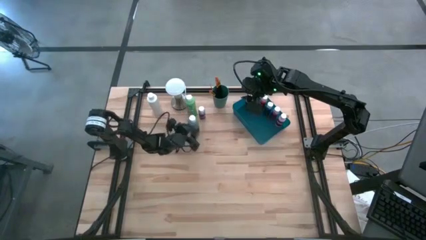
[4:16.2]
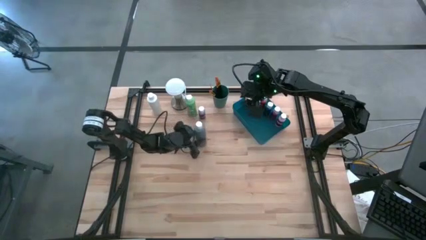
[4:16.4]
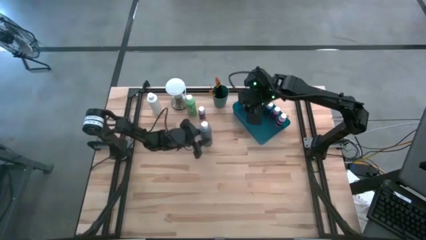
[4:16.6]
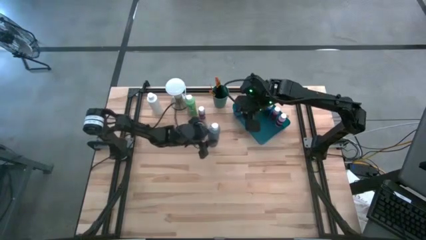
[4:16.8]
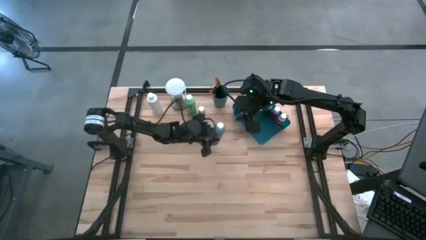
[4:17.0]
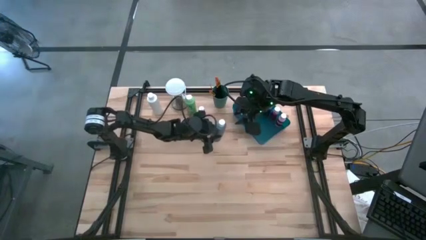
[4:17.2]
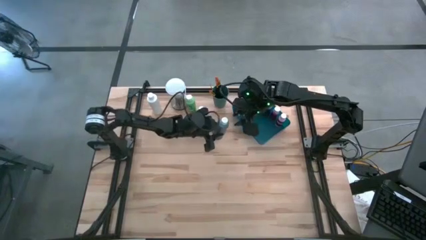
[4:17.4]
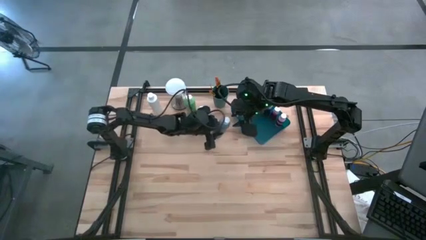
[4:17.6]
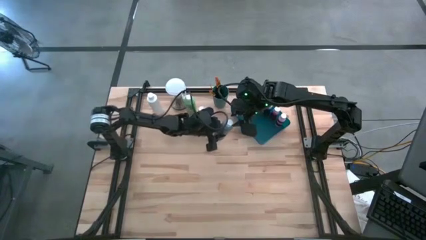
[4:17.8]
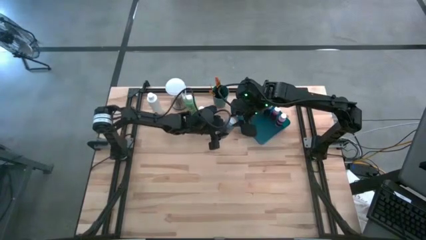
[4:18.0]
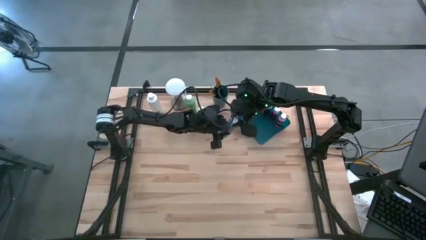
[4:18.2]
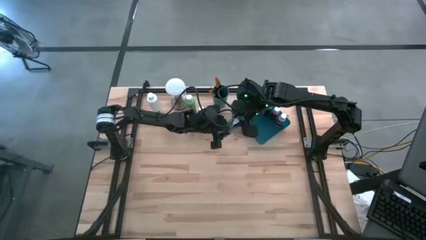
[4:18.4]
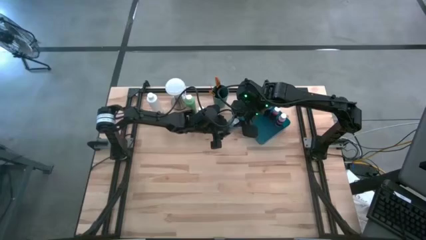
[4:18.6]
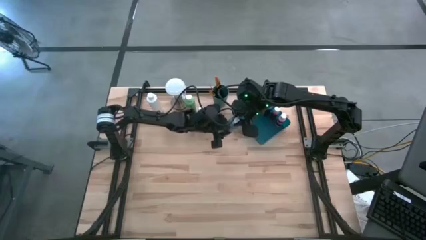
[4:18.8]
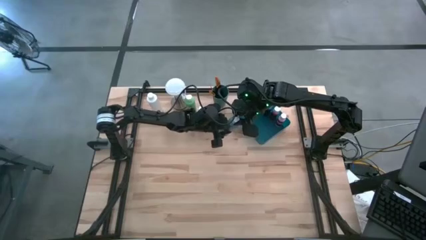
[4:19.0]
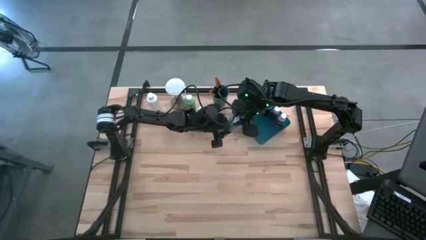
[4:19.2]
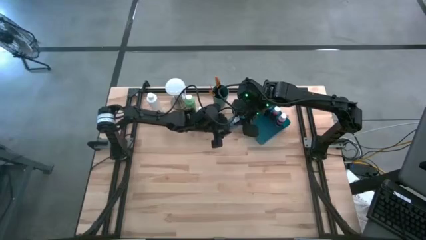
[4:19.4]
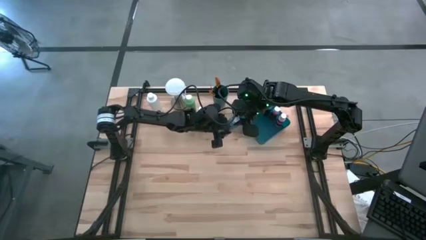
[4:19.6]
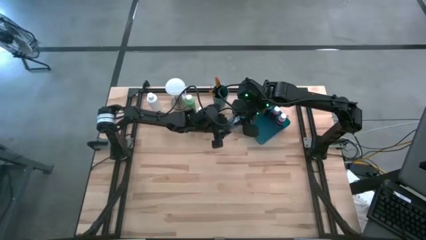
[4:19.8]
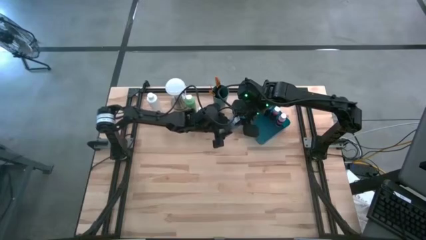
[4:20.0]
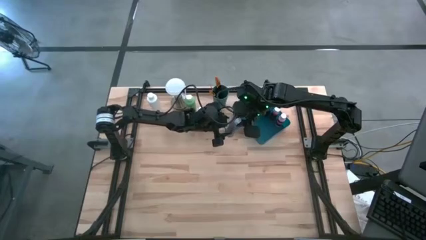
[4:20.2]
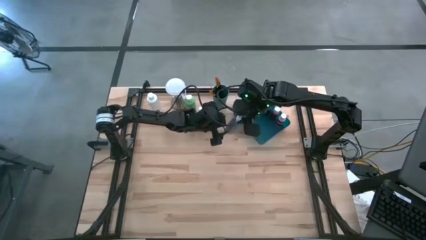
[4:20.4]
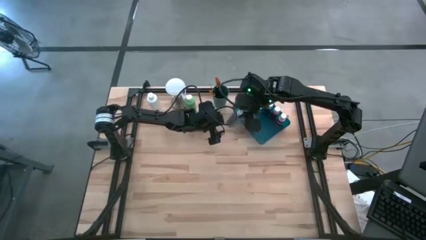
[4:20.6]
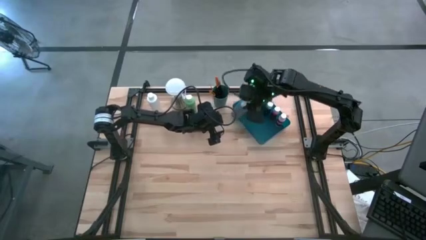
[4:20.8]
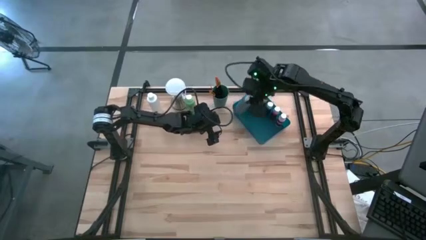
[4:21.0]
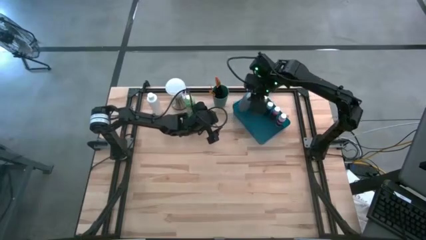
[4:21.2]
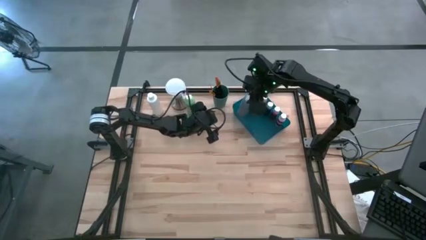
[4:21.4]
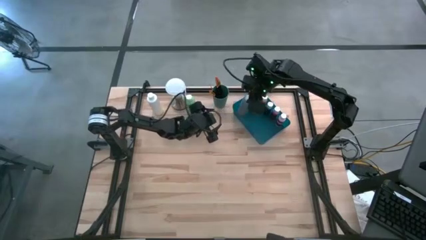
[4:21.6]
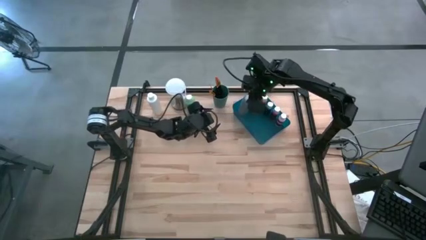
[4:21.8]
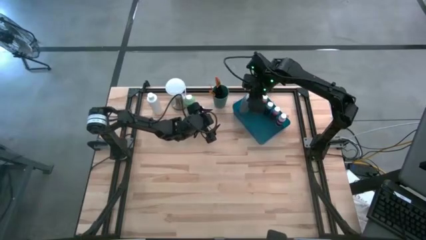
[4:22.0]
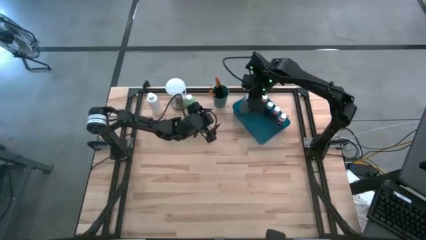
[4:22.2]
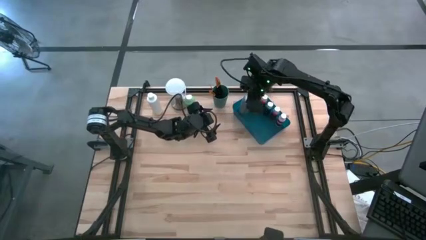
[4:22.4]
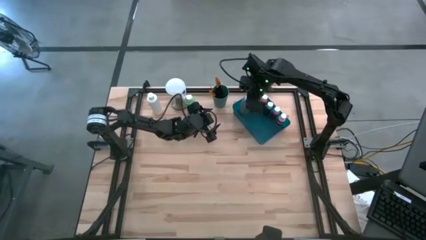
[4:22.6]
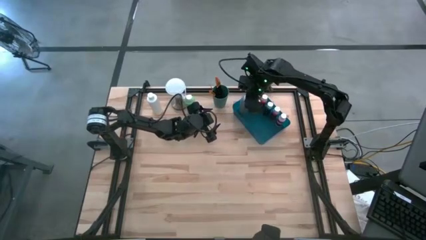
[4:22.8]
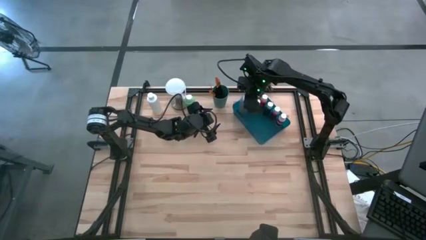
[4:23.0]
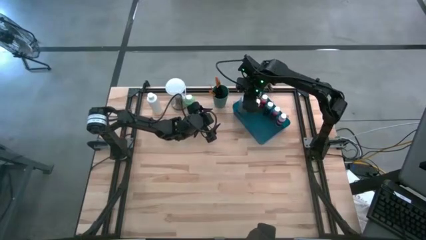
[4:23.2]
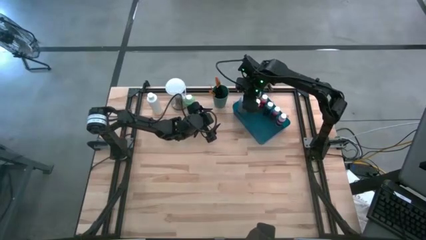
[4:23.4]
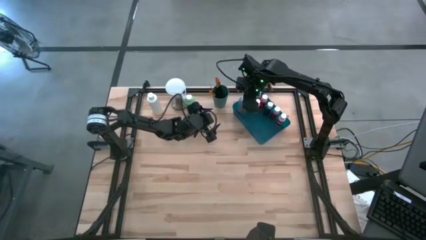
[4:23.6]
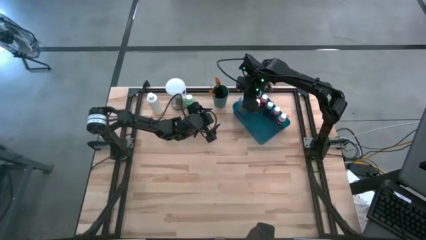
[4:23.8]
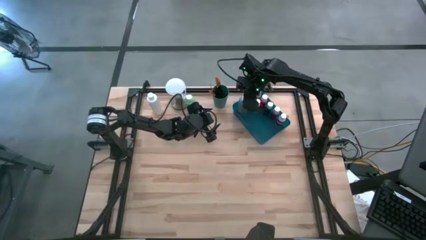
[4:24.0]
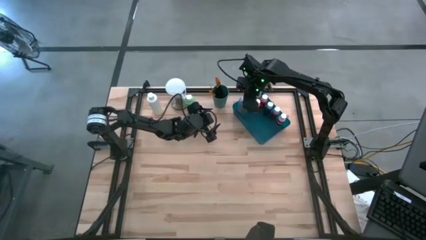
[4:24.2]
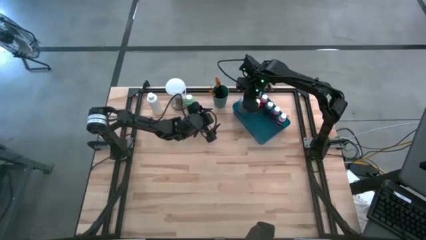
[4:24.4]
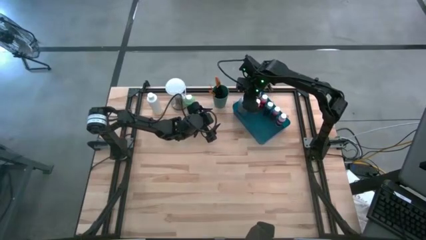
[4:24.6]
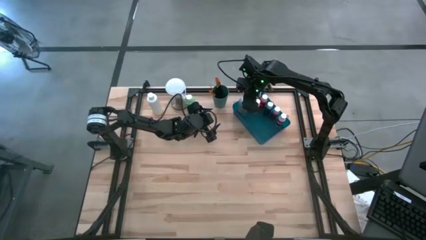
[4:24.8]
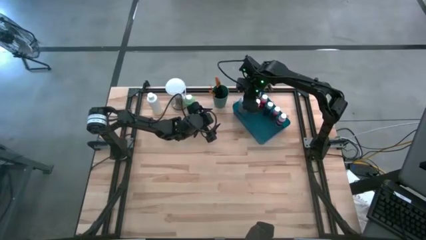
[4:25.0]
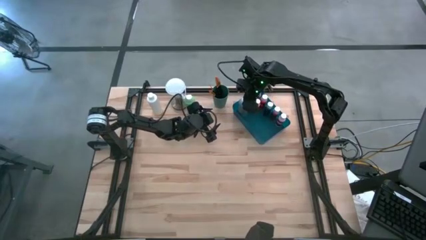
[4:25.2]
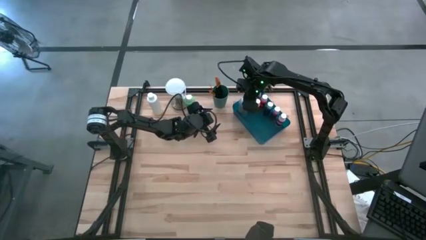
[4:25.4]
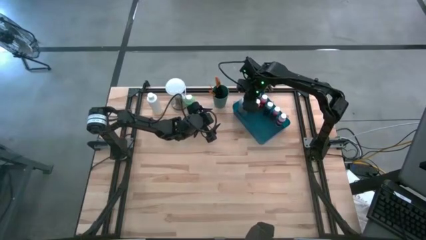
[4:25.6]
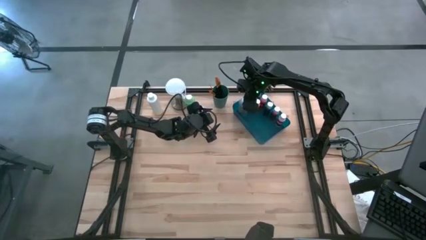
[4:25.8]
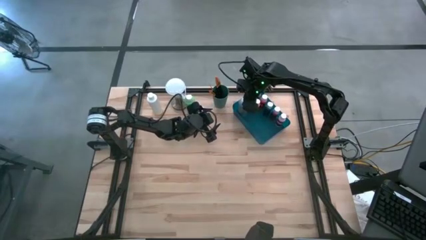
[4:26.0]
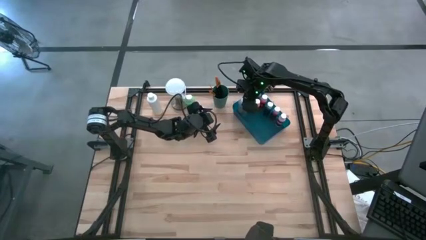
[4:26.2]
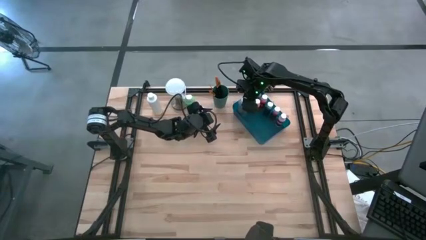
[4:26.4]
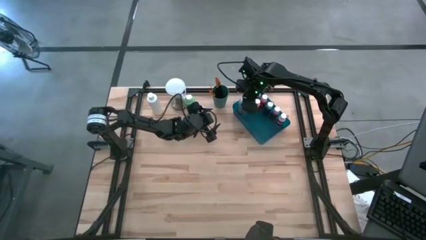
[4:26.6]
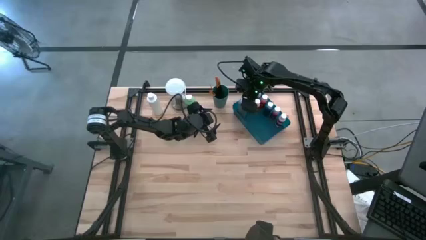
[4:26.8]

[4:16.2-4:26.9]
Task: Pick & Place Paint Supplies
Put the large blue paint bottle into the blue bin
